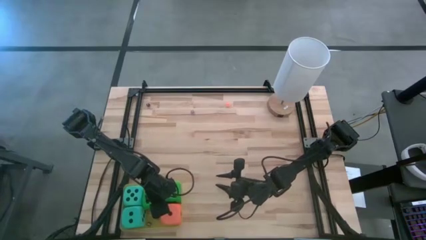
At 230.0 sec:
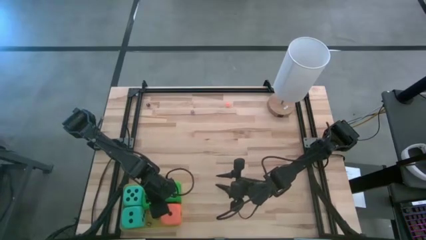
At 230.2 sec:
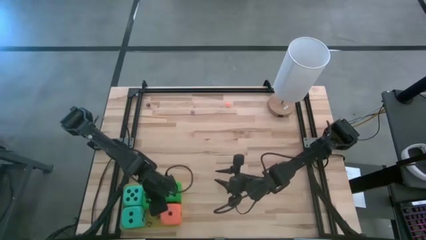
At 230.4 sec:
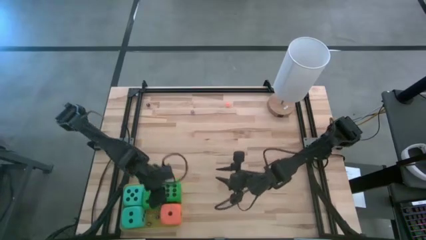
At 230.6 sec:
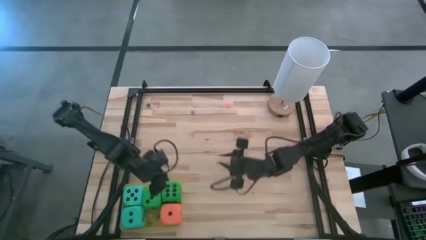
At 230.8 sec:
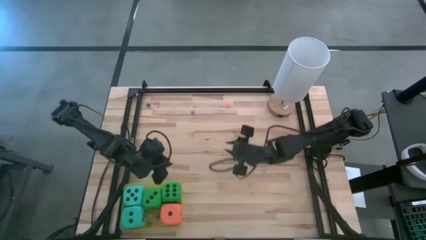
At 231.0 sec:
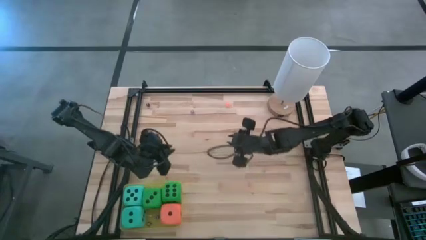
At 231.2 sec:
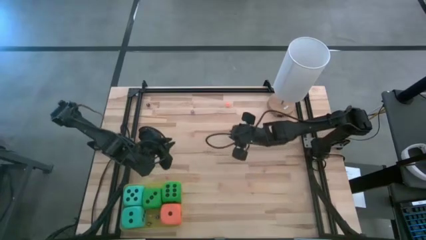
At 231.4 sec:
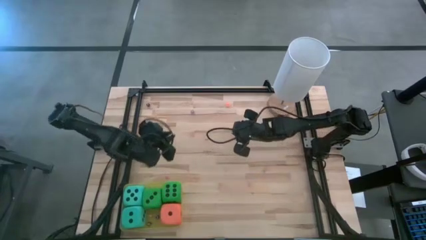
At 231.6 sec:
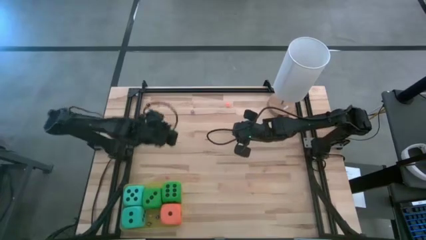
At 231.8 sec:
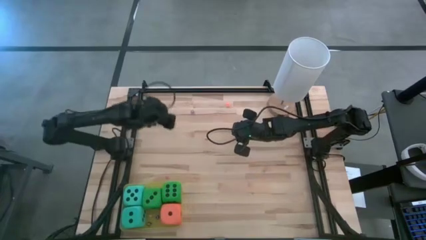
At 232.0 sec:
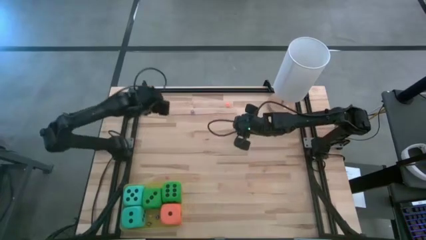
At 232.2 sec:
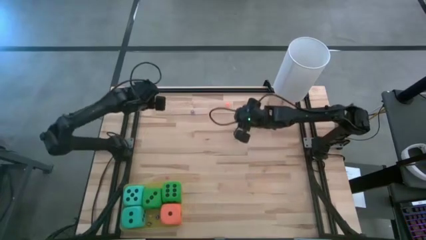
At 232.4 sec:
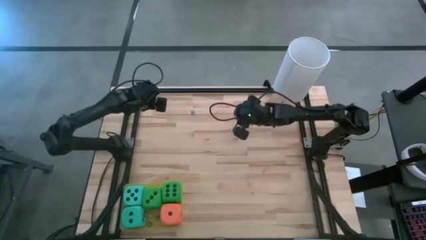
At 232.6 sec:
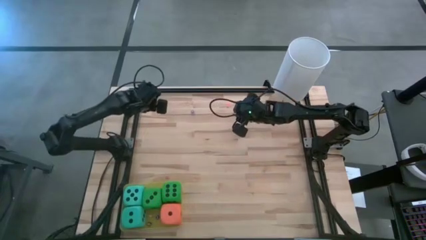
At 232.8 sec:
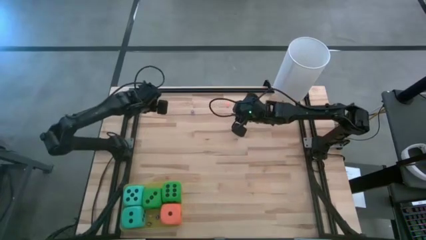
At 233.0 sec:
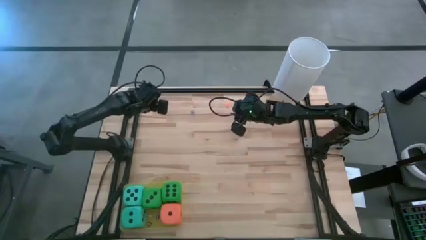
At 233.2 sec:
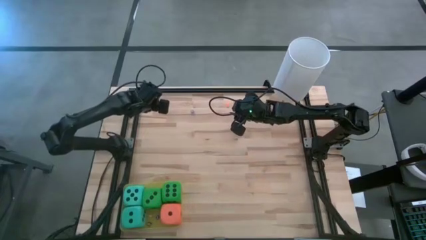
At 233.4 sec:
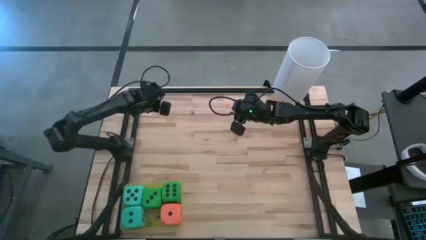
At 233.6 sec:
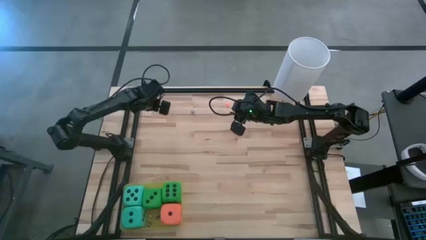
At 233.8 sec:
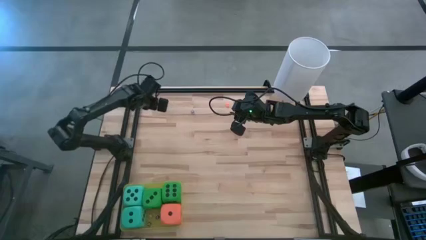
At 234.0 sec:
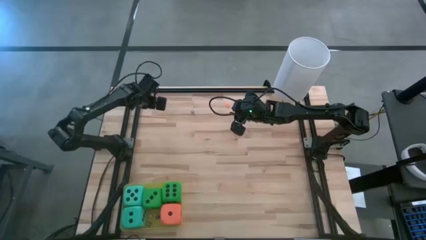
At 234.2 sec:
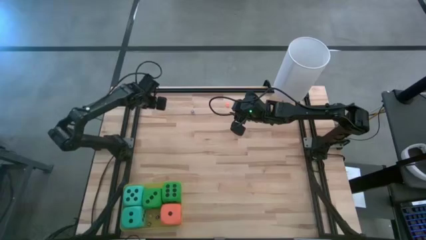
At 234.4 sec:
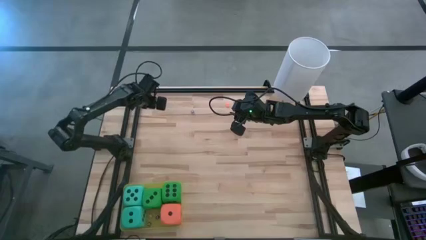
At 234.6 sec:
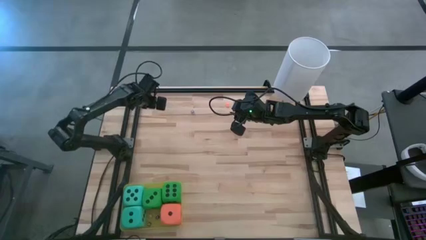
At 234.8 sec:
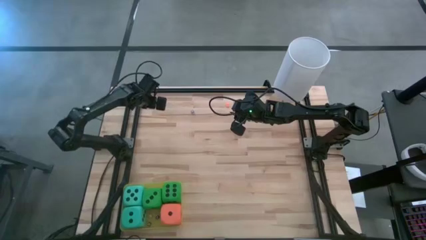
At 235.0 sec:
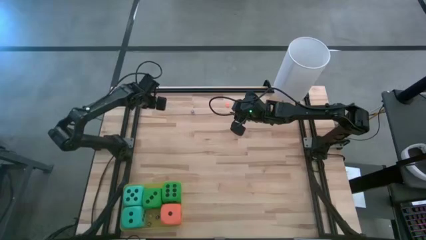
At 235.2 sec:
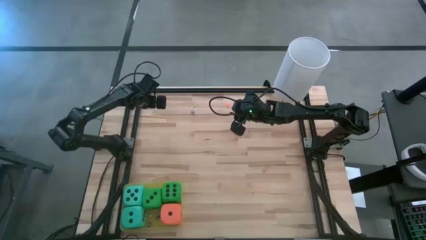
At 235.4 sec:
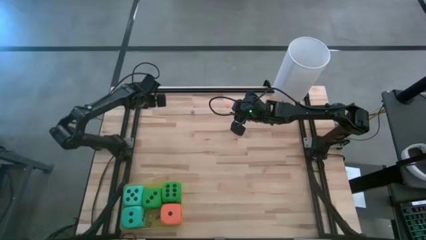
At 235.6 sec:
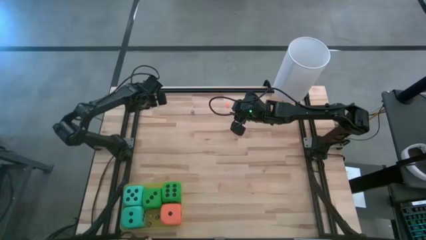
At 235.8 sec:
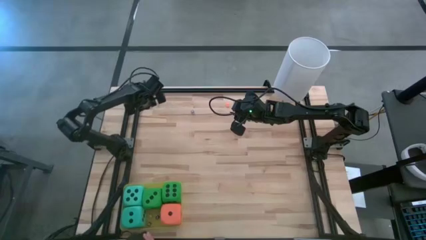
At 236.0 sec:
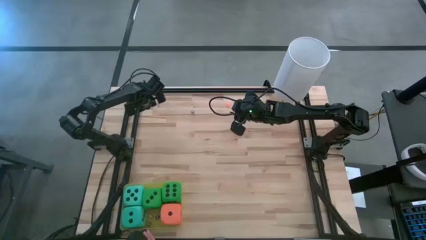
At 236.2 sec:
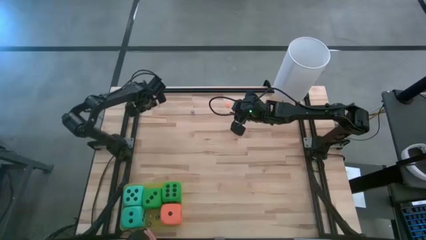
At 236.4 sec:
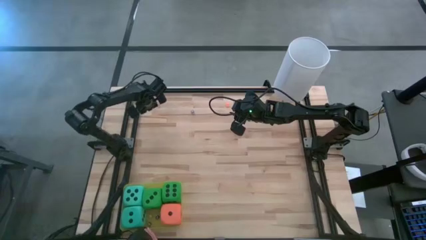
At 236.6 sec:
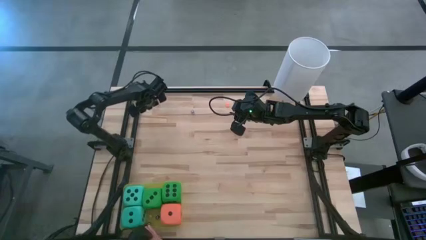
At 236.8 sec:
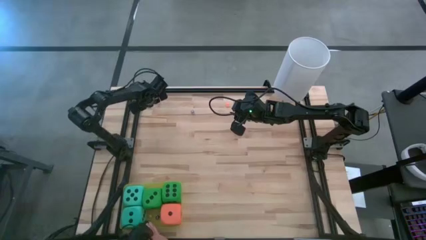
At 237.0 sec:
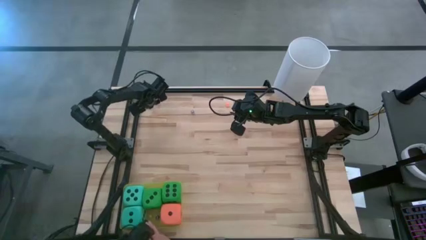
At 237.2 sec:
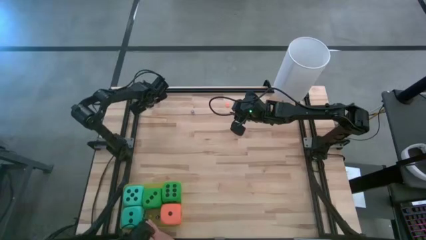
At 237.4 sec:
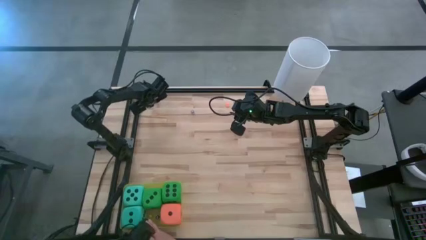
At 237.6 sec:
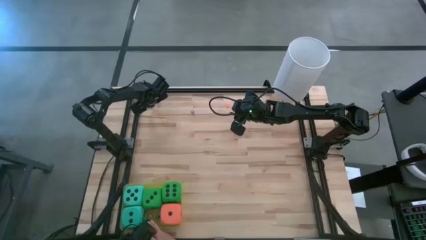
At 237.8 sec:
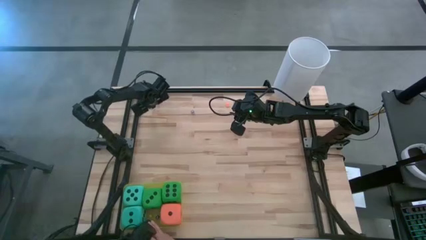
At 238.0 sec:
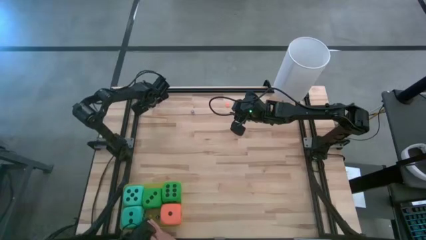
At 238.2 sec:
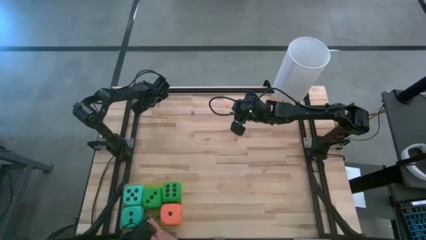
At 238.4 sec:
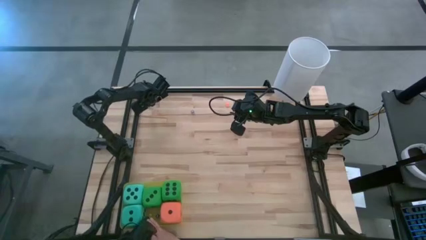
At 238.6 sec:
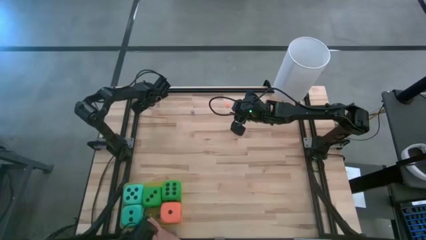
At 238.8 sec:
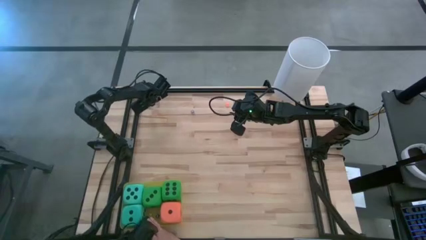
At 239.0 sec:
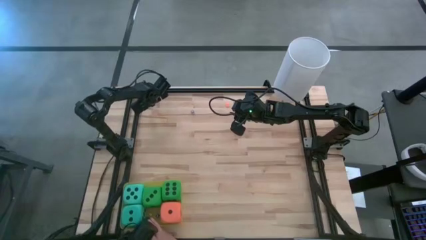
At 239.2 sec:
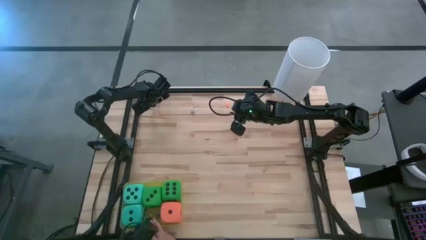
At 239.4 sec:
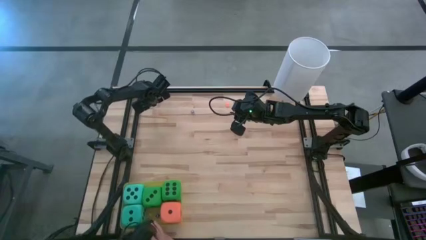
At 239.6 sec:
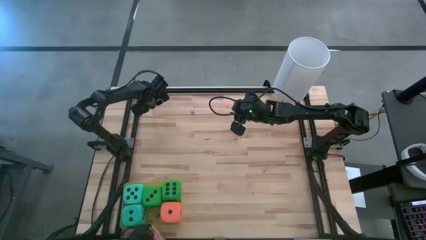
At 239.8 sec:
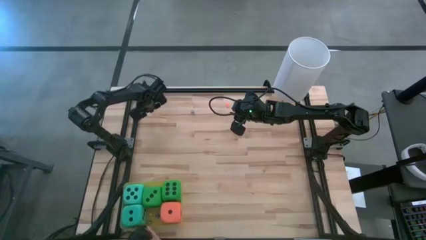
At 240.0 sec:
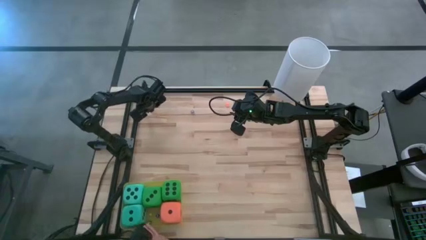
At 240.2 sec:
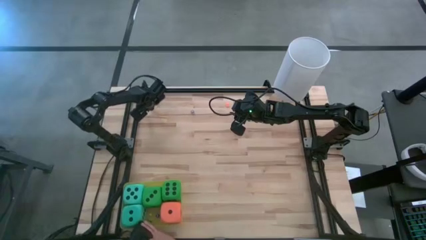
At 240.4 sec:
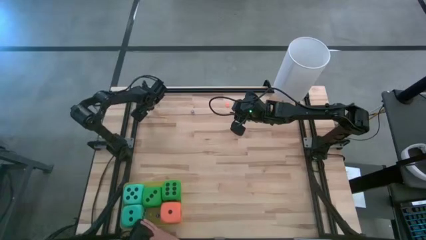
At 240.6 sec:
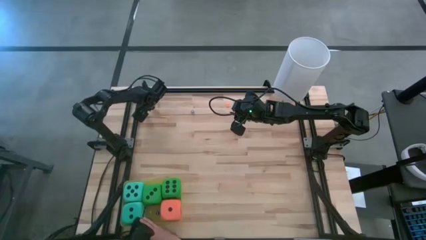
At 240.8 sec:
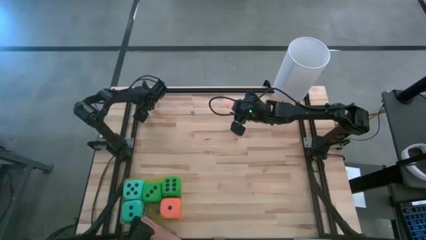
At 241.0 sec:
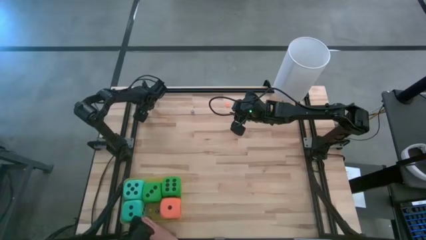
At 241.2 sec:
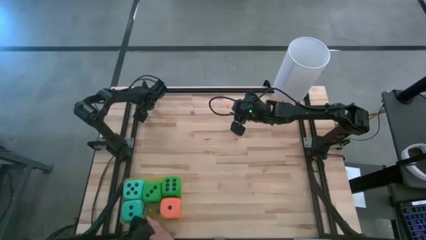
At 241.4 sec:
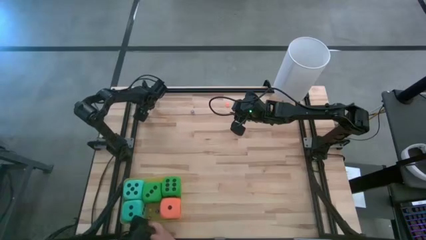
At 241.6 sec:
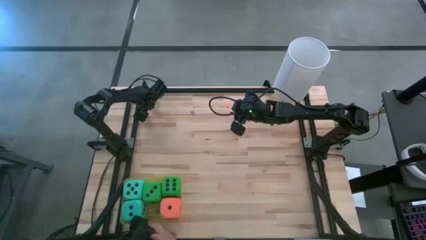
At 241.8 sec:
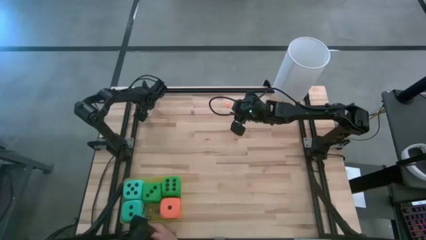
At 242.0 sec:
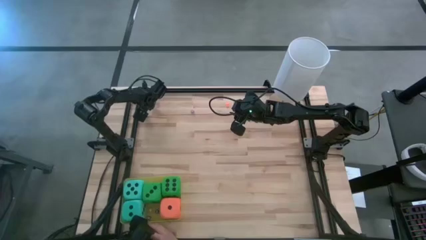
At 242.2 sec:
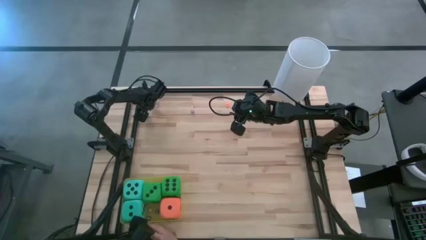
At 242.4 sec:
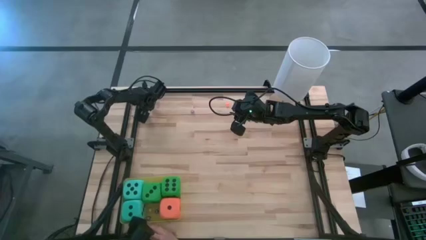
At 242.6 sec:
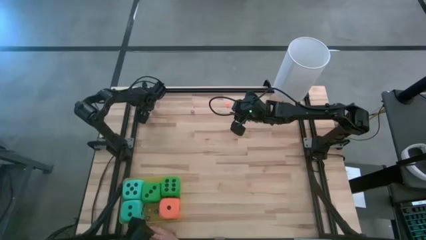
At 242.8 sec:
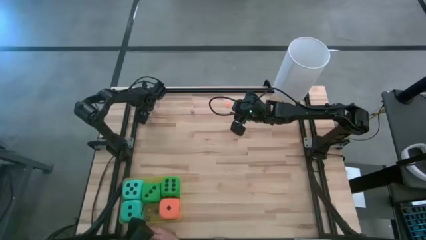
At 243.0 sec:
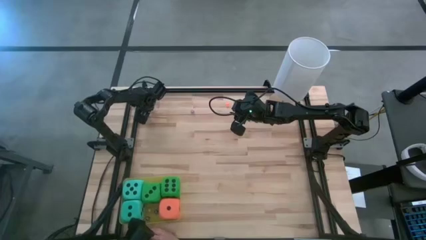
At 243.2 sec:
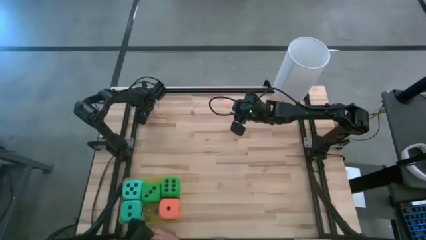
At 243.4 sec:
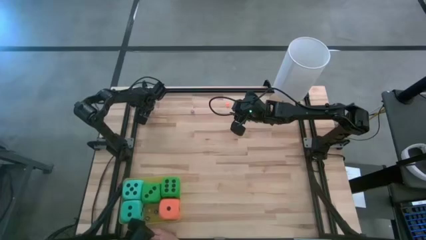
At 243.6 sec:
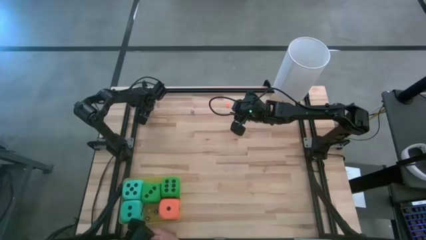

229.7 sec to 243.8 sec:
Task: Pick & Place Dice
Put the black dice into the yellow bin
